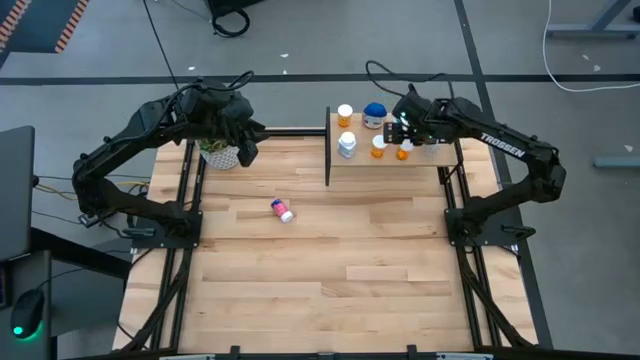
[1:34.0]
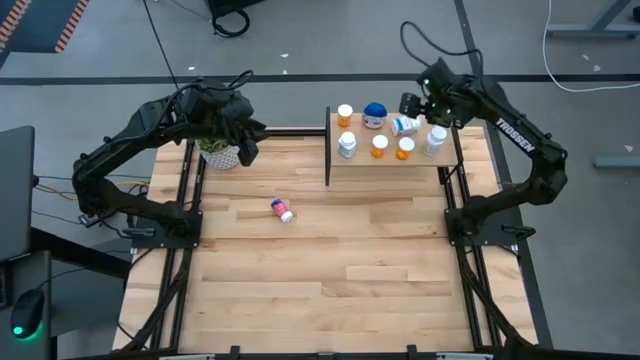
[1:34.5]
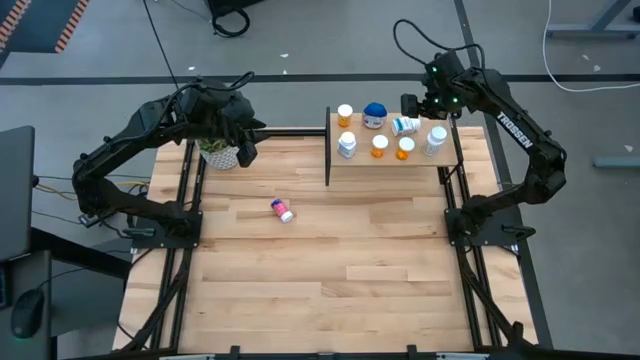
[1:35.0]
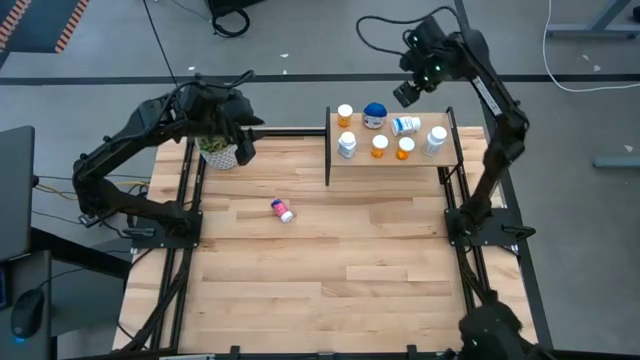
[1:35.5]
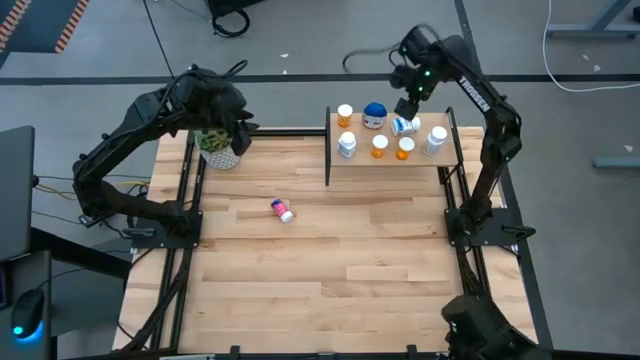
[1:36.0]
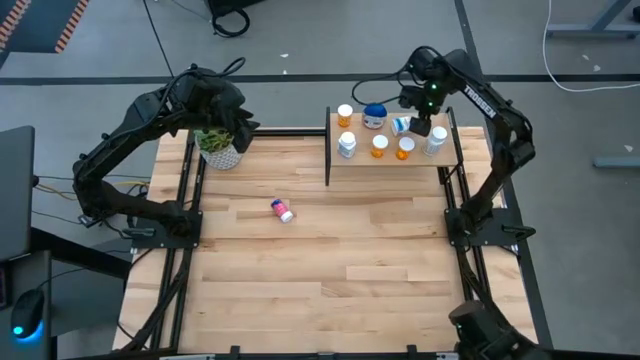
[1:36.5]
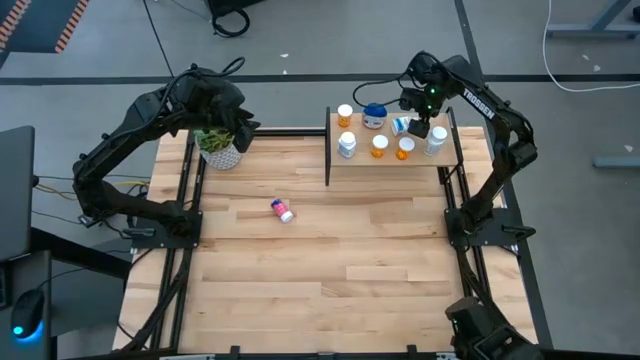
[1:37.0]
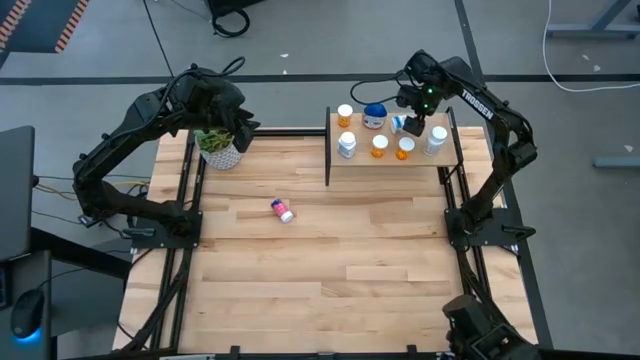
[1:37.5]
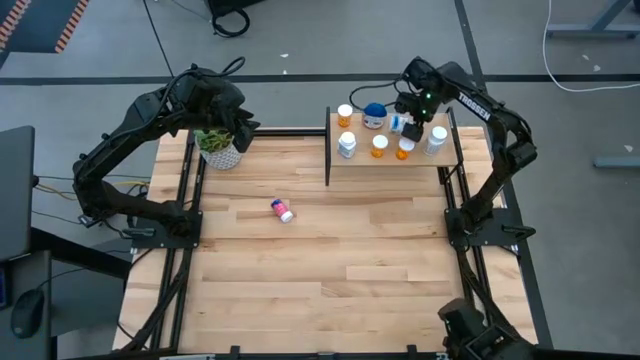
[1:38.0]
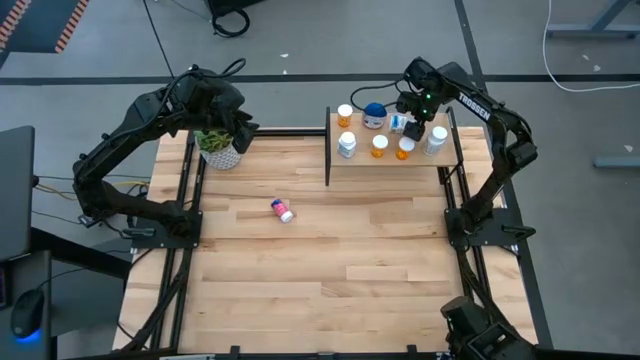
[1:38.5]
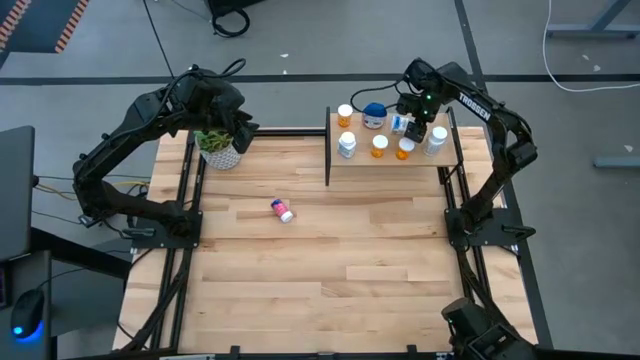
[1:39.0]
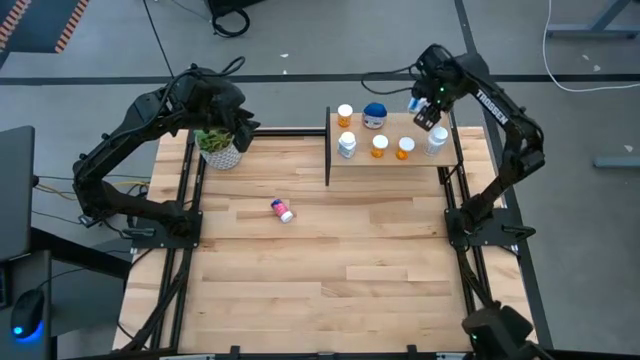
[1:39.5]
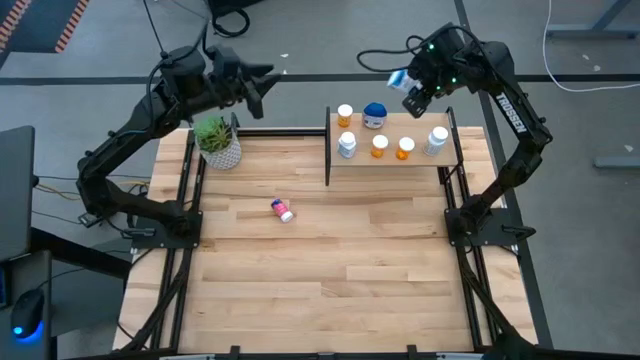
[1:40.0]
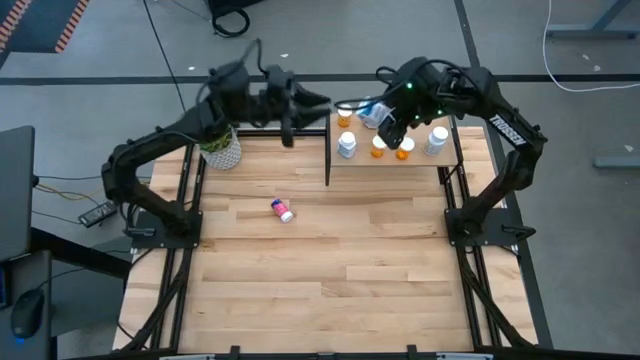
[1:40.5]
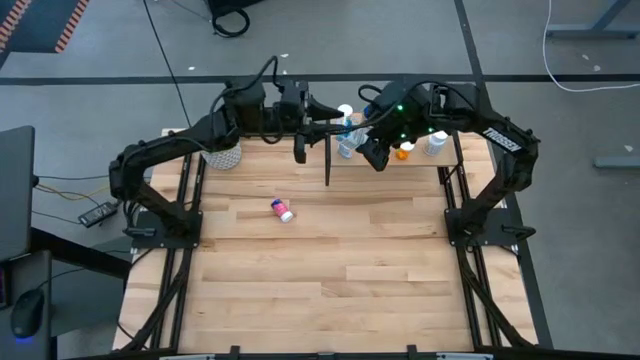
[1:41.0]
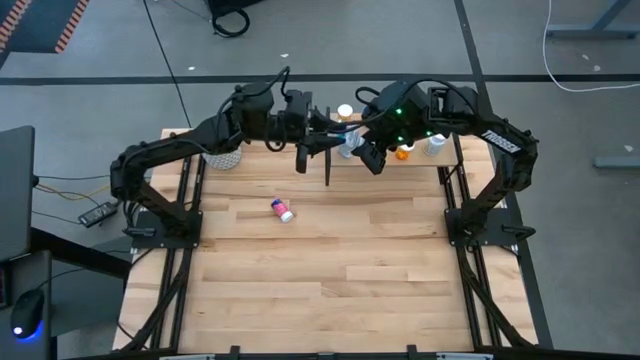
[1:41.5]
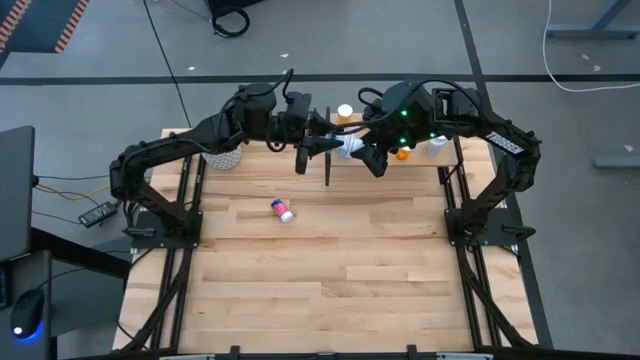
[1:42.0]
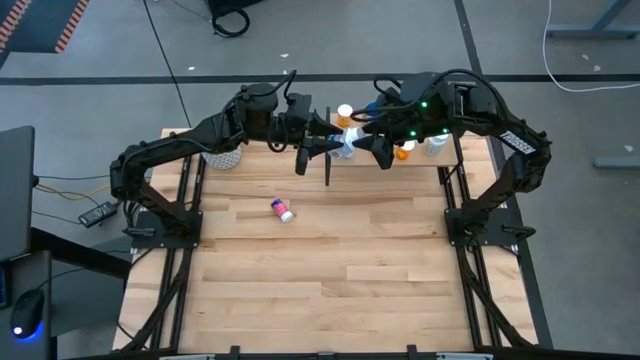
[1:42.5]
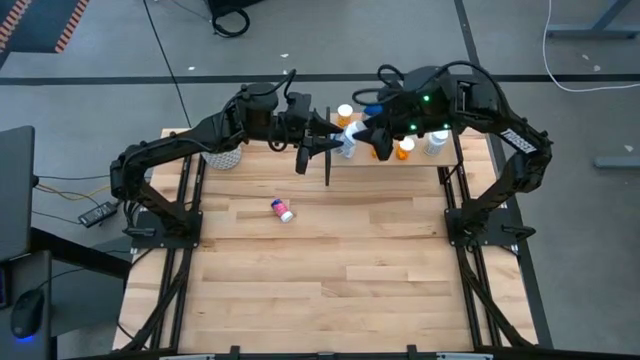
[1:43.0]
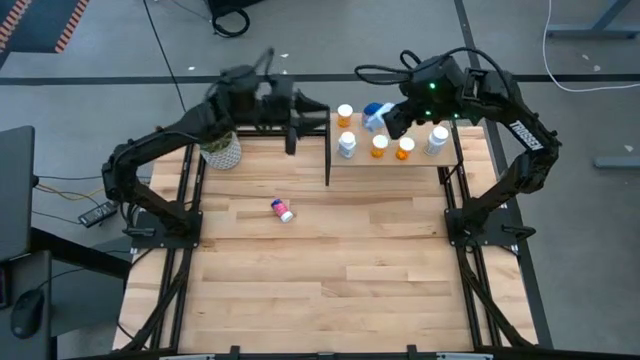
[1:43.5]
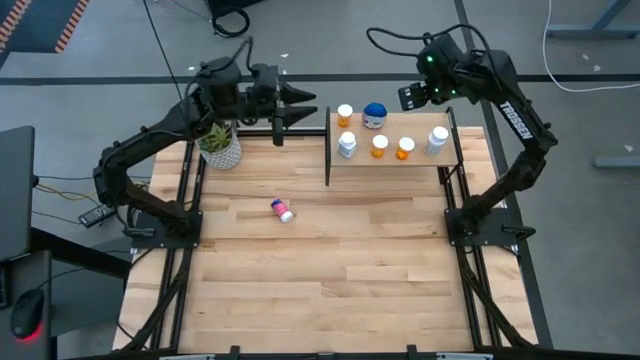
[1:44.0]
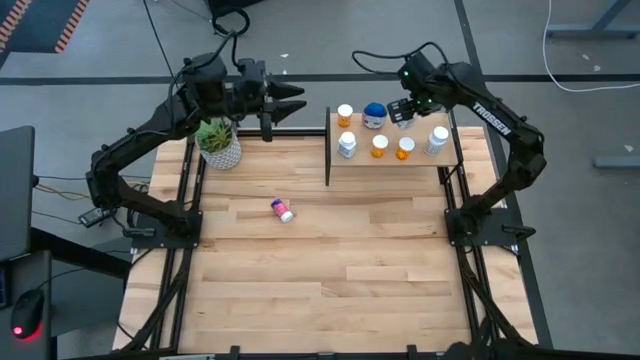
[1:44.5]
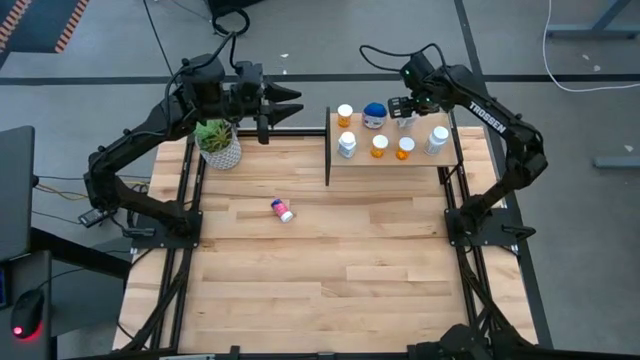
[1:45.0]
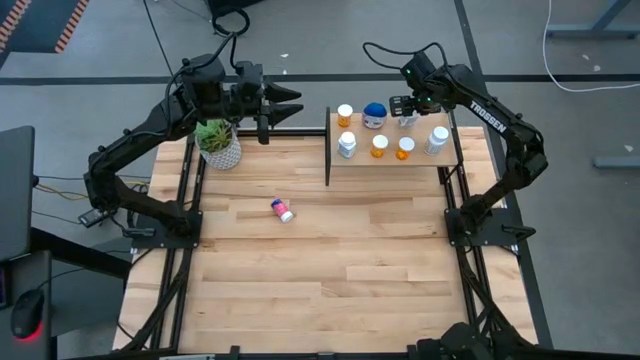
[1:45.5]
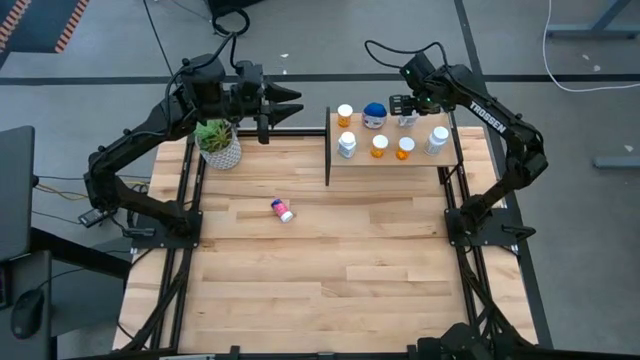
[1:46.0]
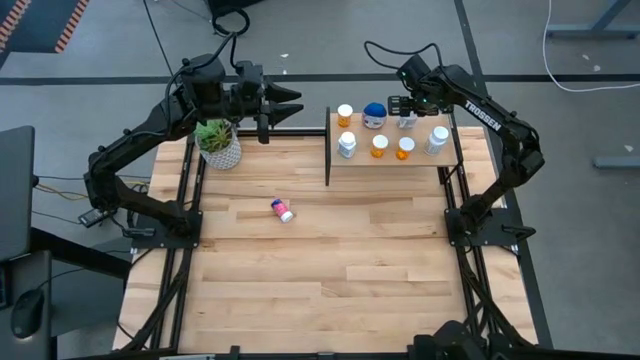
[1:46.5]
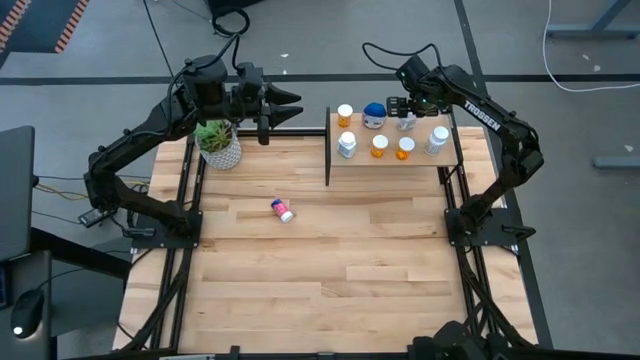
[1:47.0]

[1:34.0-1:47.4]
Task: Pick and place medicine bottles onto shelf by color
Put the white blue pill bottle on the shelf aligned with the orange pill bottle

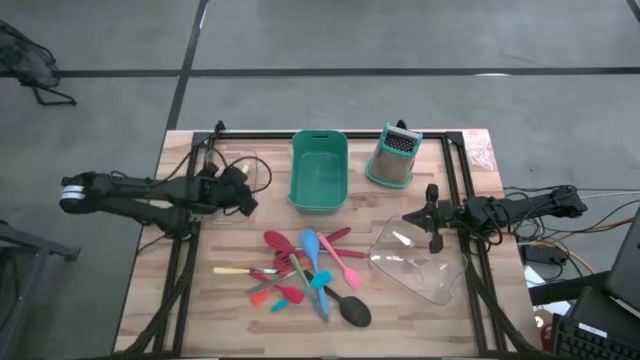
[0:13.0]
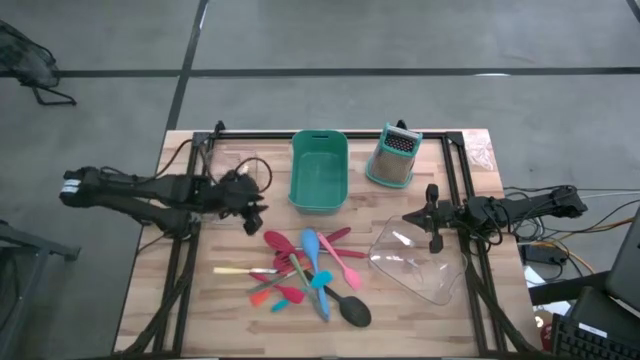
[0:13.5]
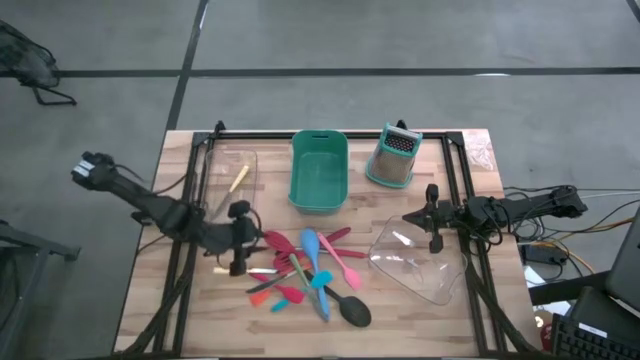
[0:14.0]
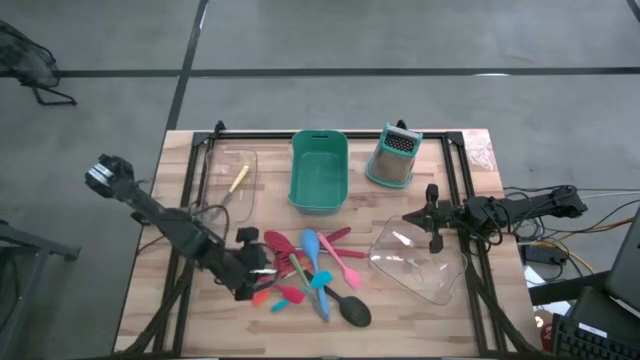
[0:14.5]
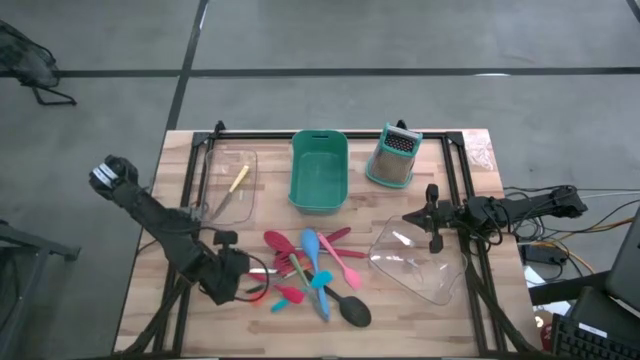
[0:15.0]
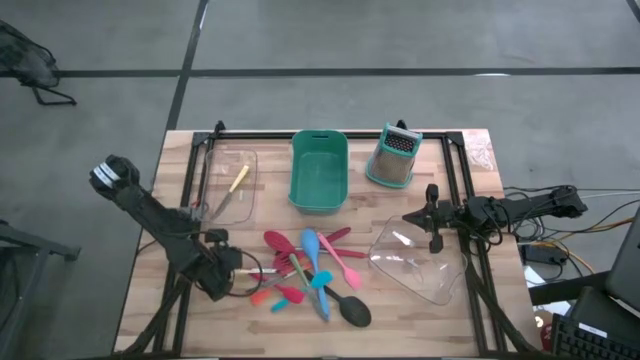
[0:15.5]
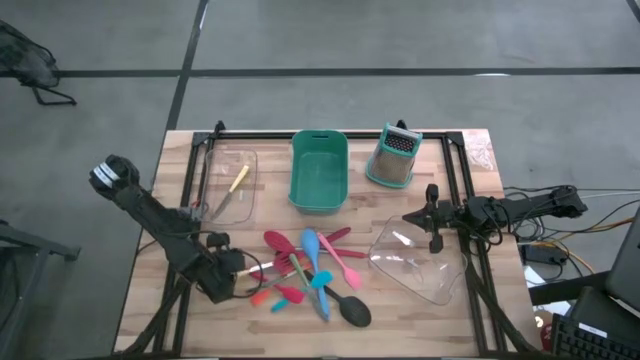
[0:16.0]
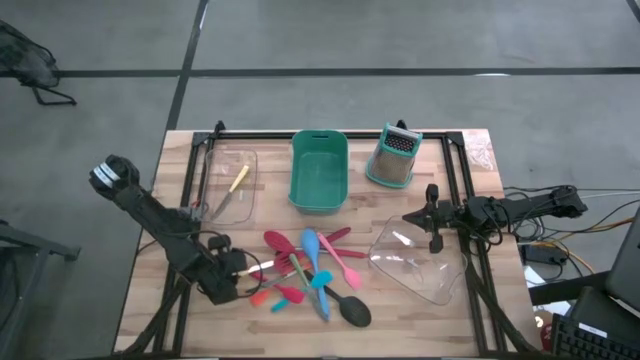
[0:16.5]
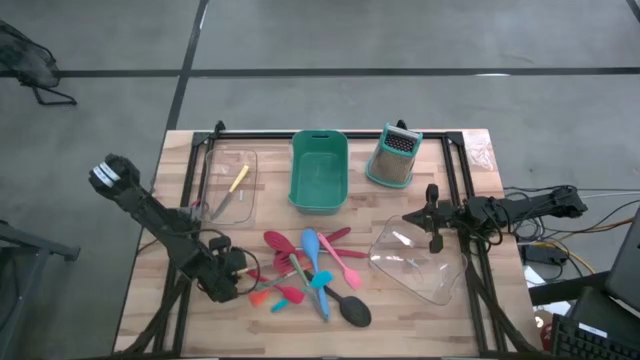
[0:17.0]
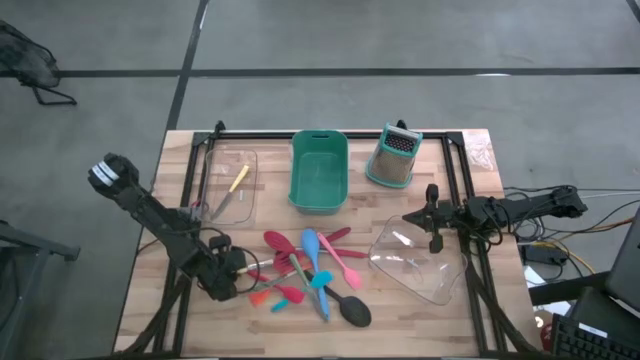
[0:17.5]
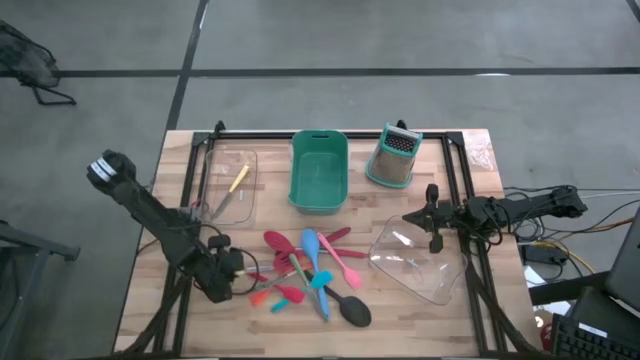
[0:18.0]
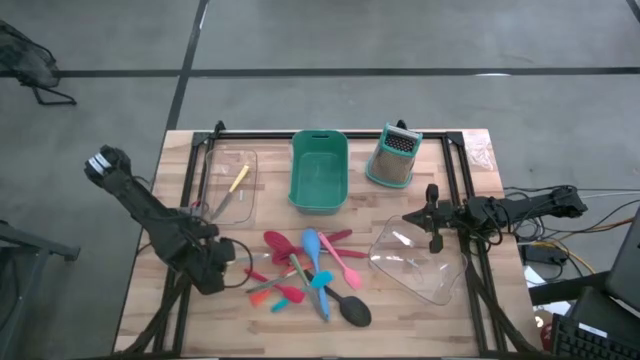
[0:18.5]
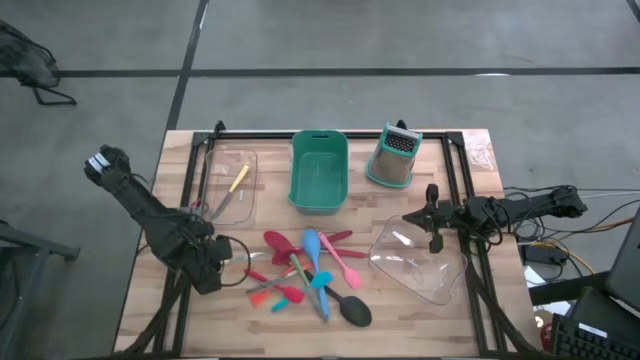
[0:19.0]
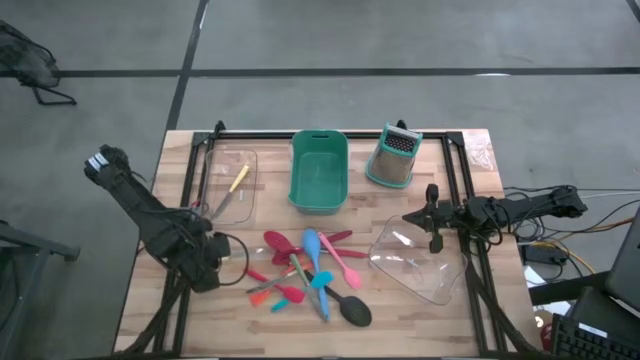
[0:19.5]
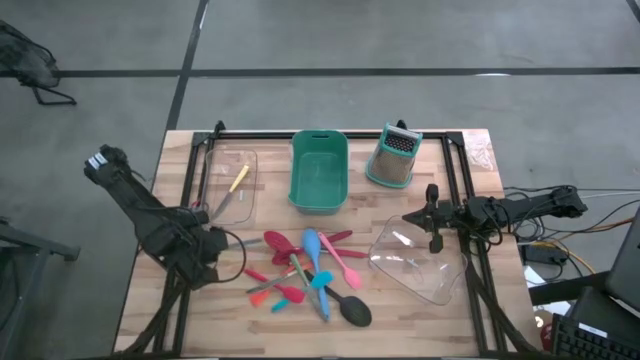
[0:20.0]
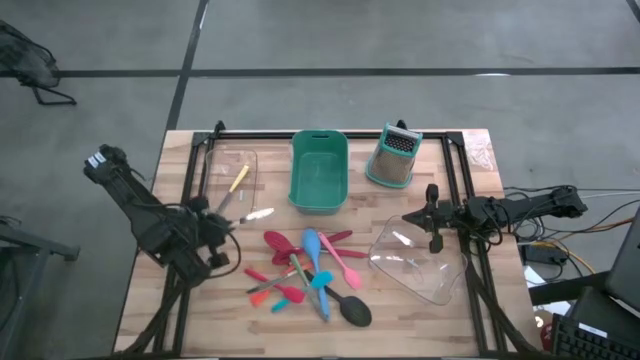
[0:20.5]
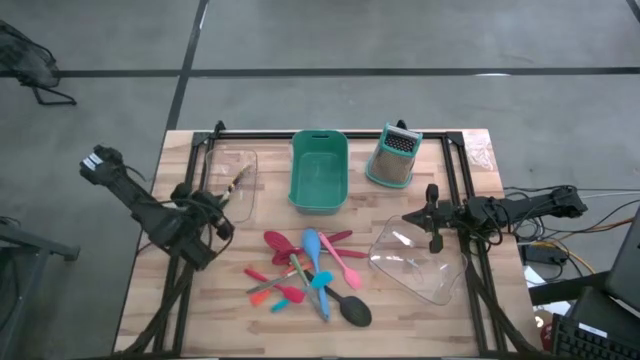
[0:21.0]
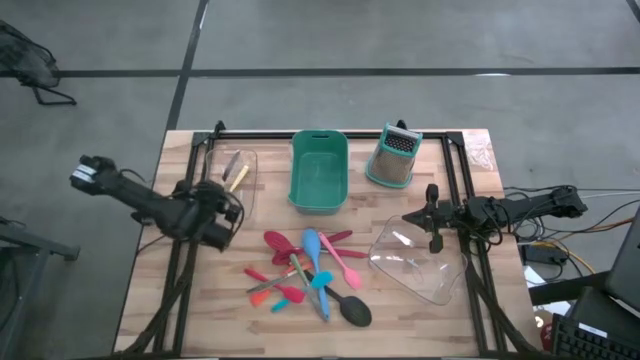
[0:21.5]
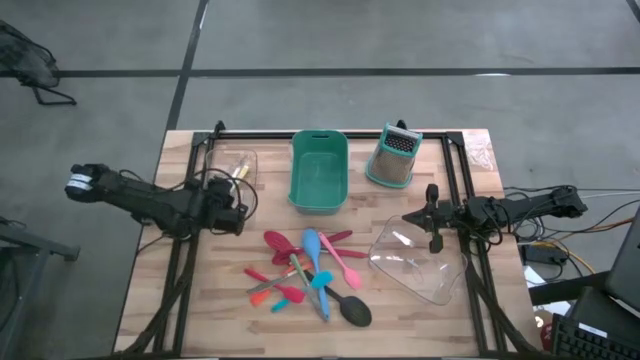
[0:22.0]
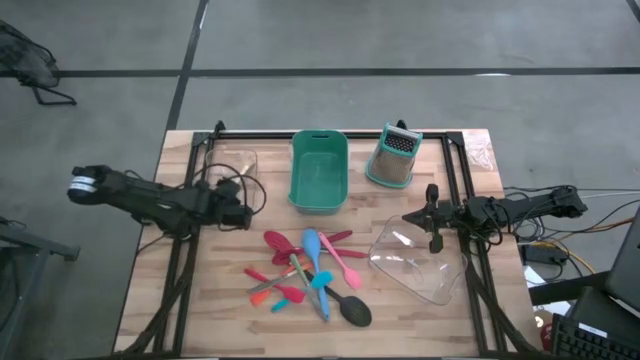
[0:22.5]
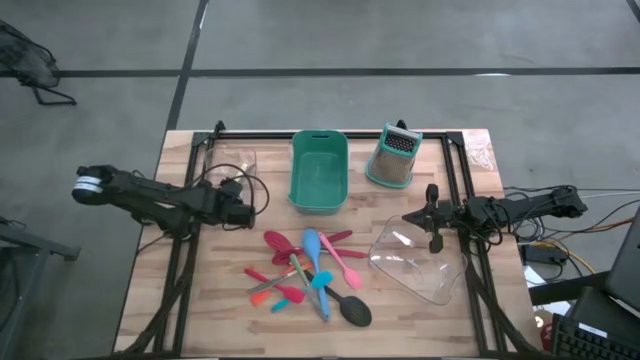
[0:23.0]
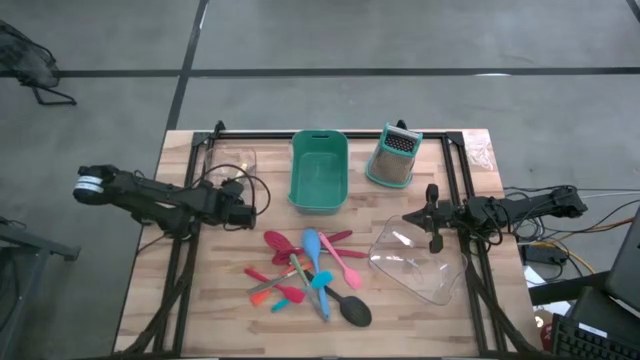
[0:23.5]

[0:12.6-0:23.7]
Task: Pick & Place Kitchen Items
Put the yellow table knife into the top transparent bin
